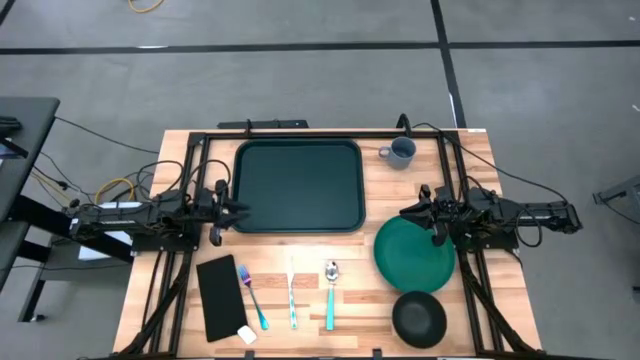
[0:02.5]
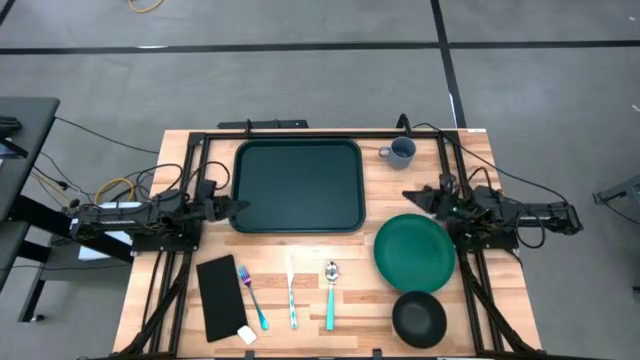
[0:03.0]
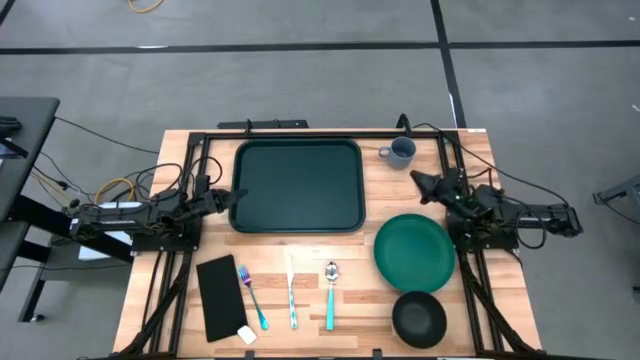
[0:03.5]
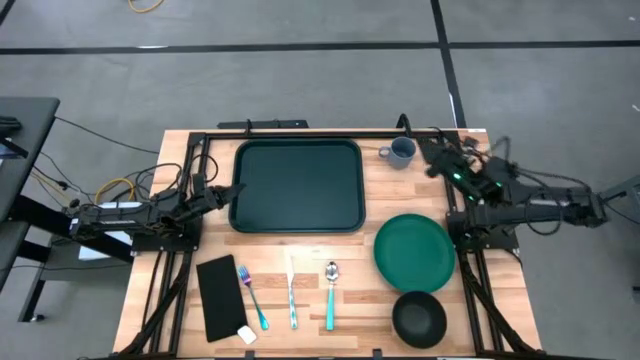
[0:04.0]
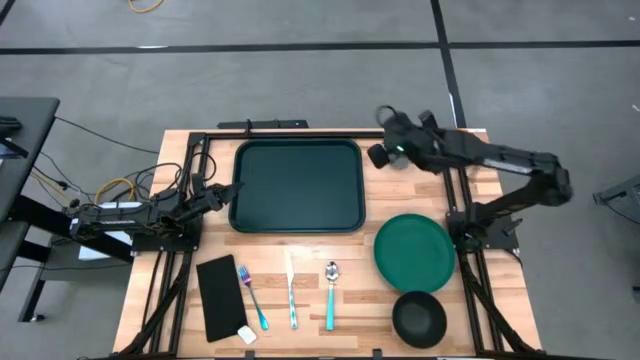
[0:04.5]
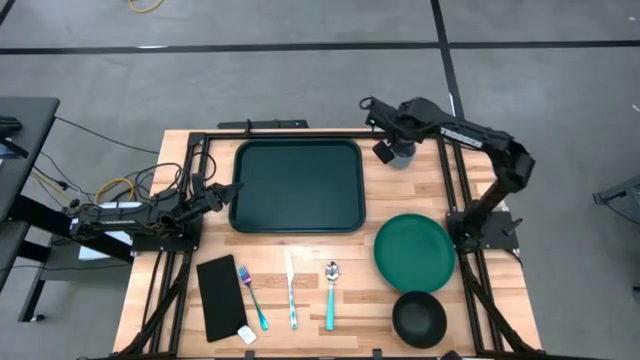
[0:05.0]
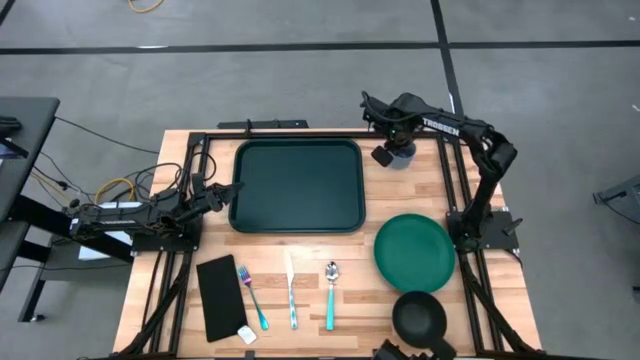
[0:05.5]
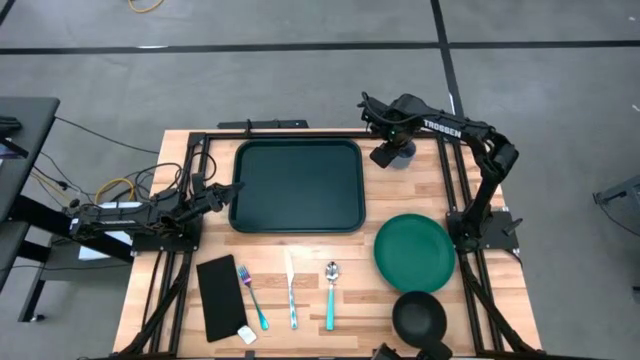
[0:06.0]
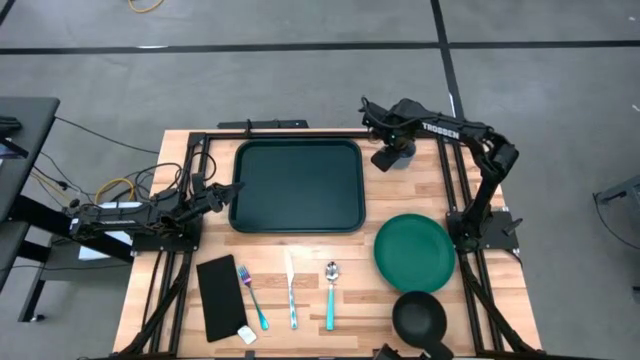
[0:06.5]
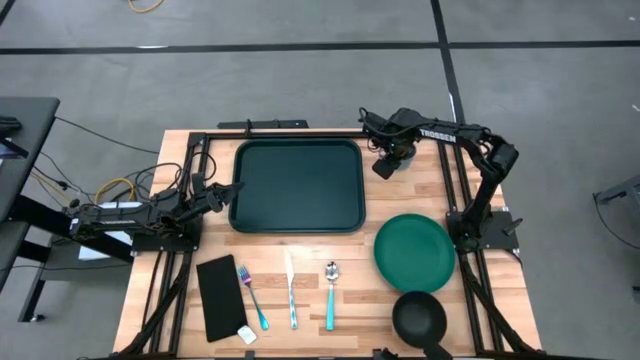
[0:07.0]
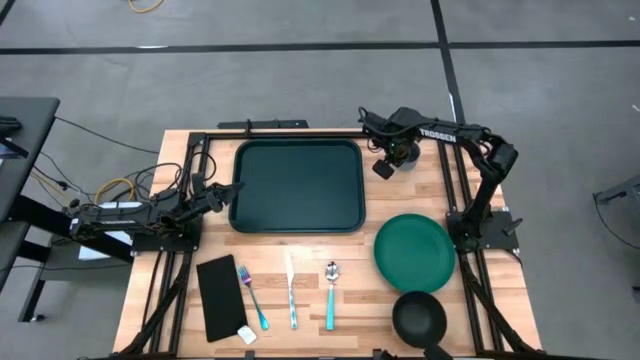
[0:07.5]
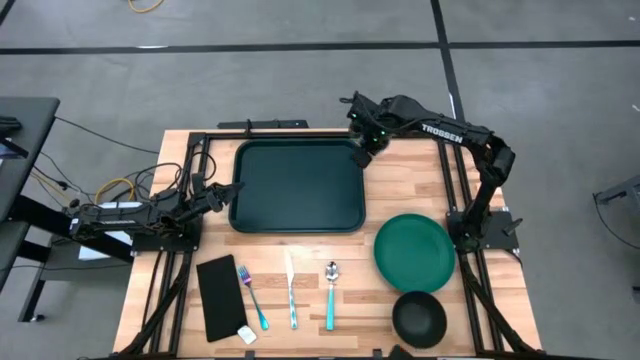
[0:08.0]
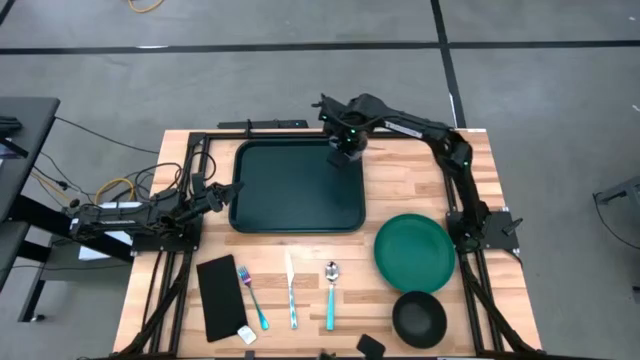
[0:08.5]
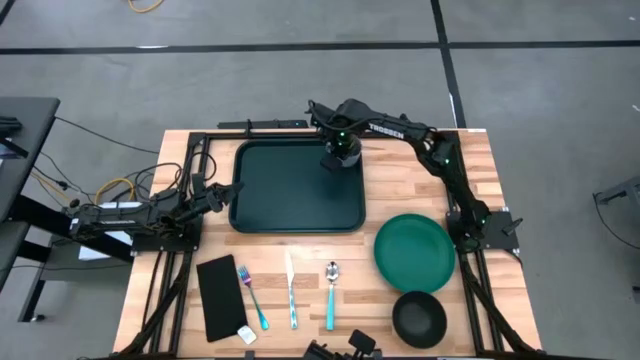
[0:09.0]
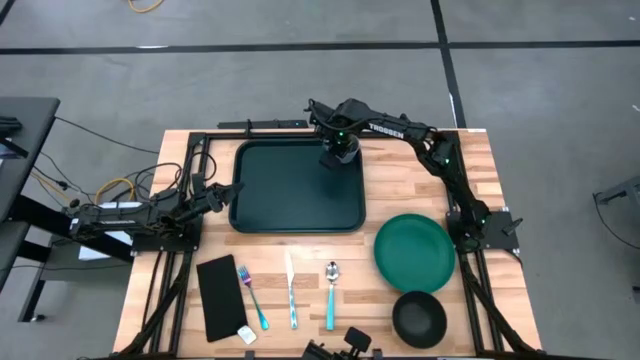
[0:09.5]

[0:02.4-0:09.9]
Task: Set up tray
Put the gray mug on the top right of the black serving tray

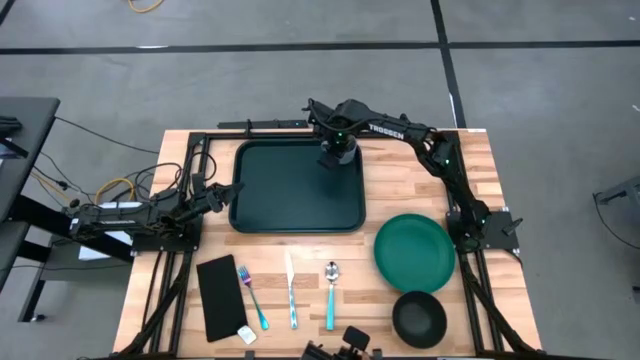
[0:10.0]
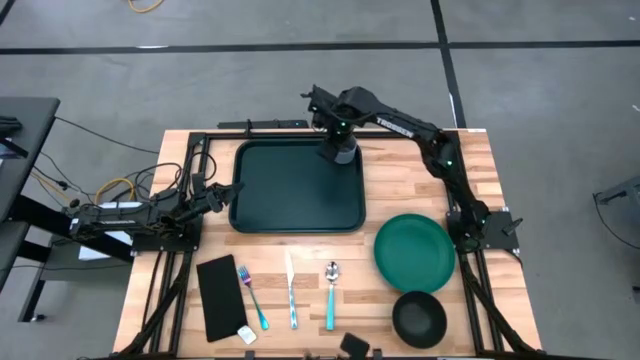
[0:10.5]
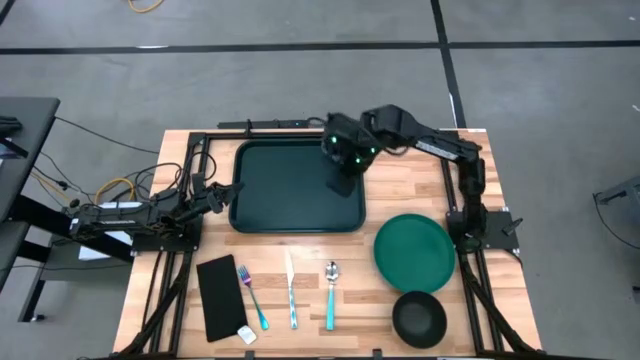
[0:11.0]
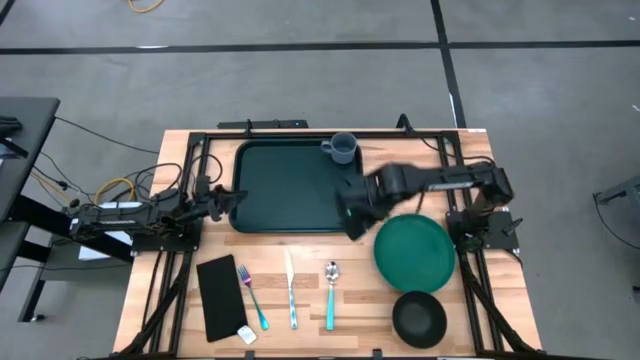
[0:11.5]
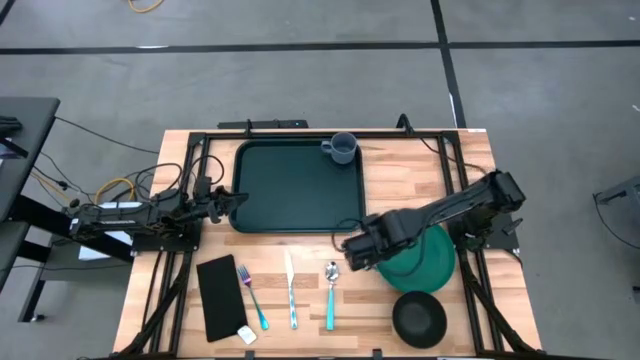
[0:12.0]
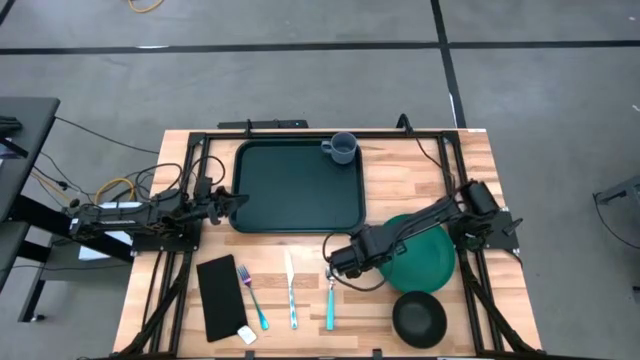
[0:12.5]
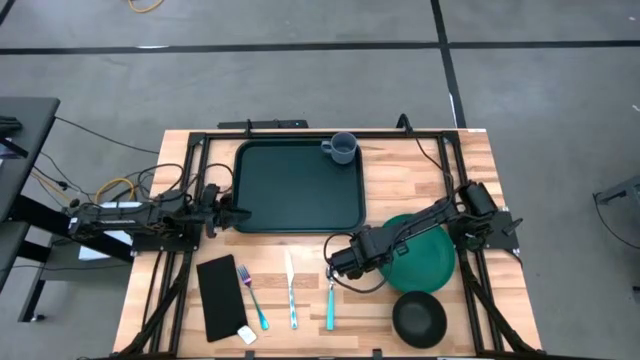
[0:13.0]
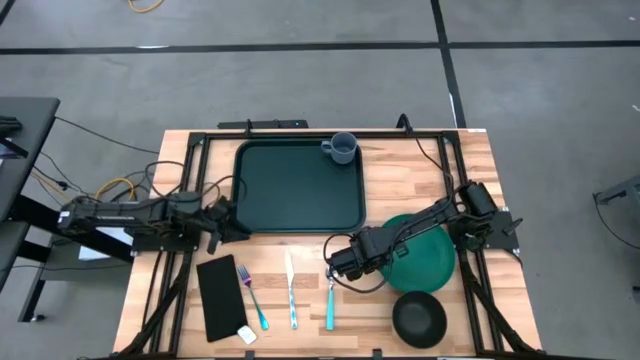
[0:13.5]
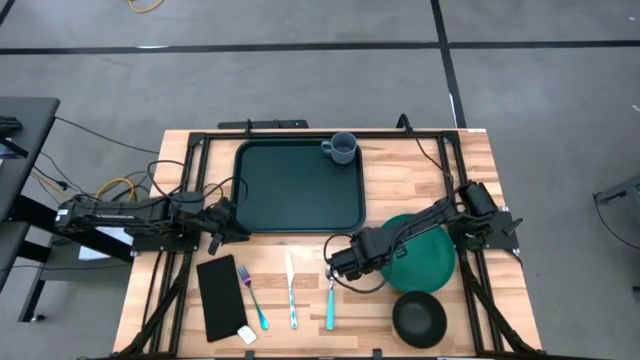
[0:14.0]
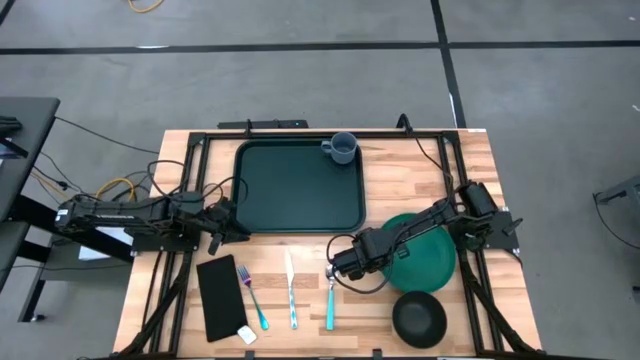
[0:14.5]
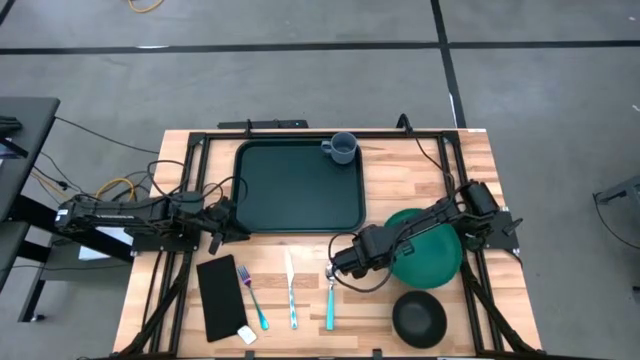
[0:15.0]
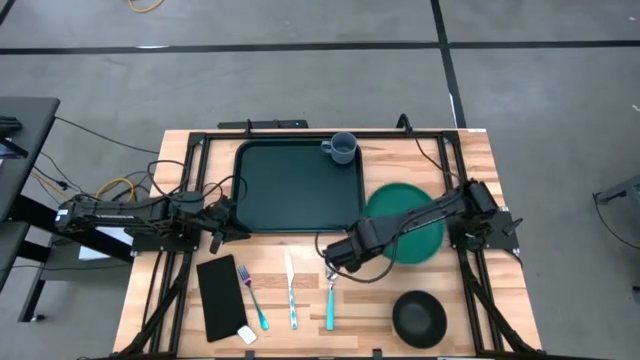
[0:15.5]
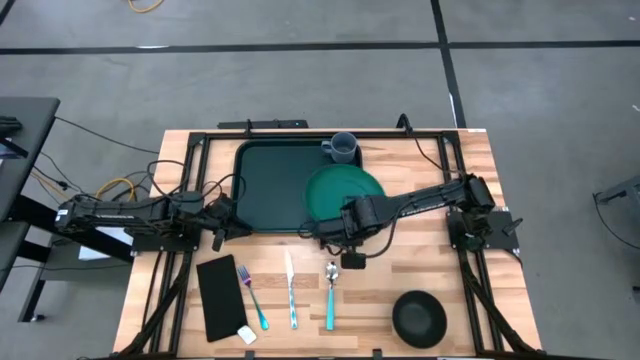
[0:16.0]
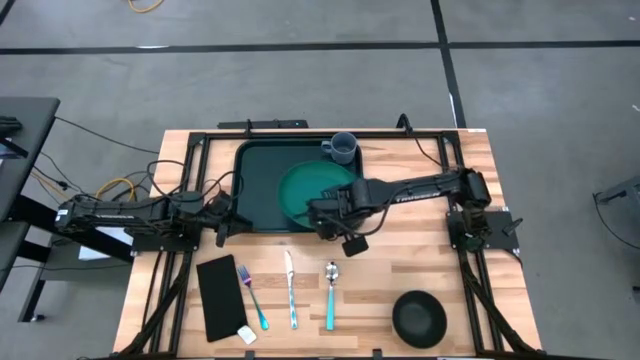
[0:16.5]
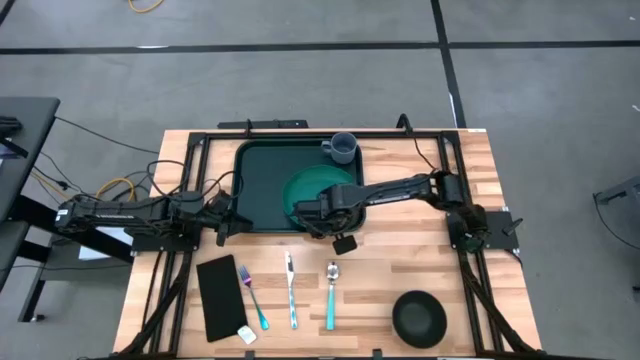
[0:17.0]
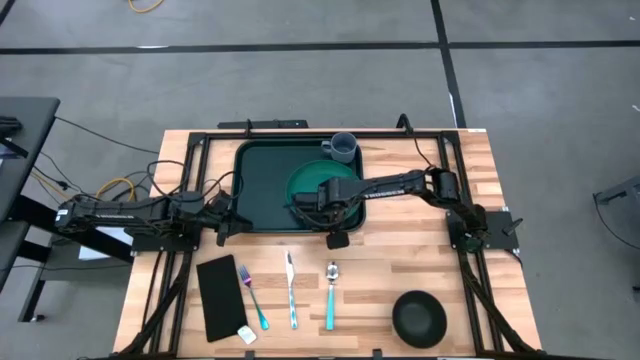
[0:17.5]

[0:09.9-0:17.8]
Put the green plate on the black serving tray to the bottom left of the gray mug

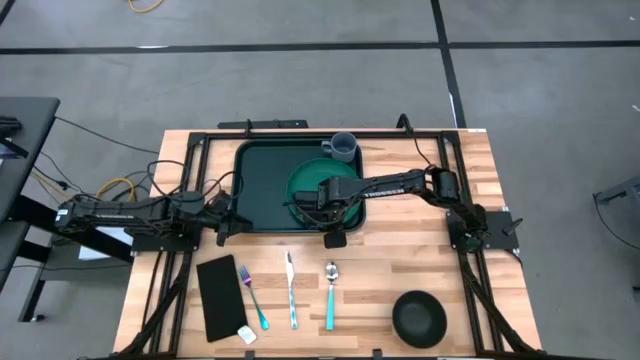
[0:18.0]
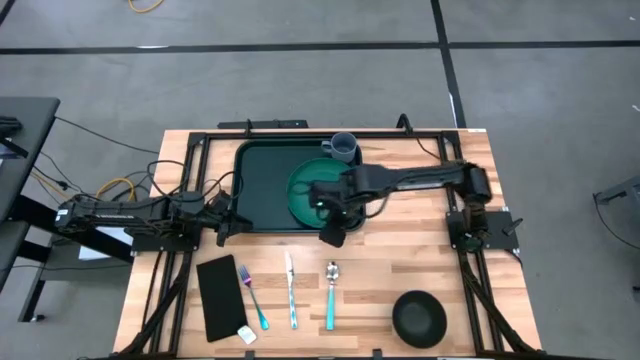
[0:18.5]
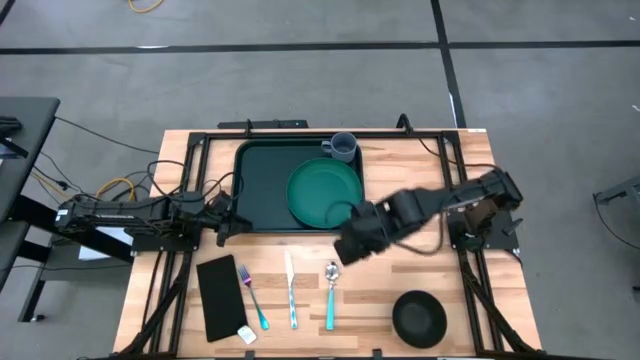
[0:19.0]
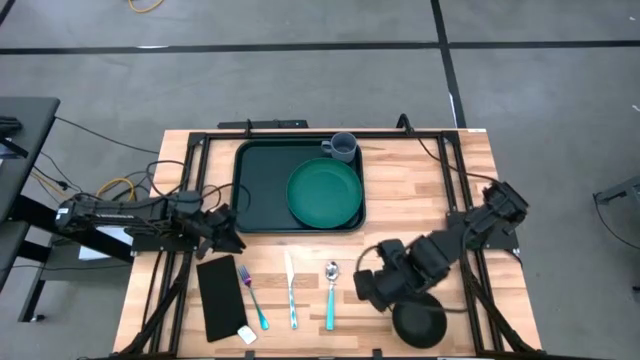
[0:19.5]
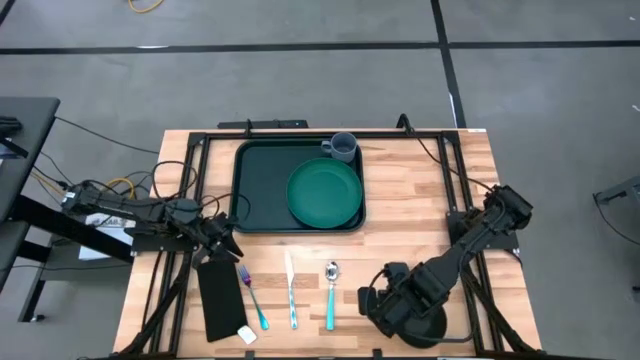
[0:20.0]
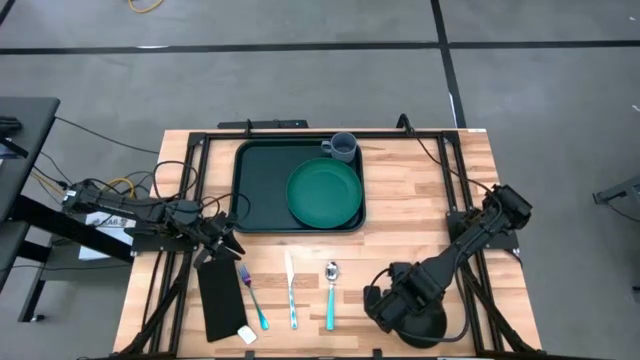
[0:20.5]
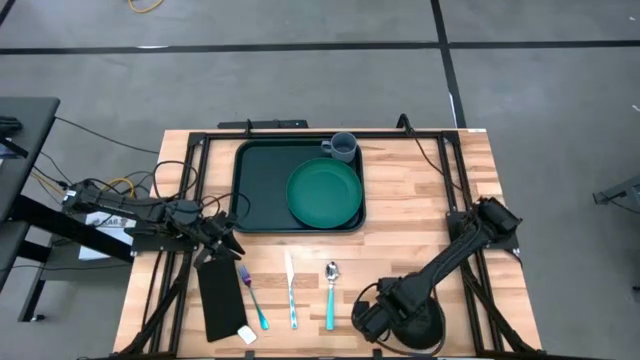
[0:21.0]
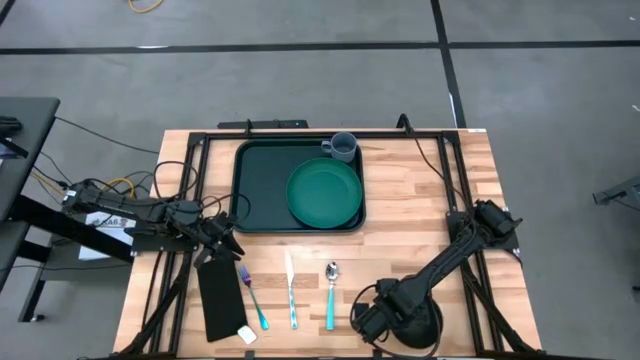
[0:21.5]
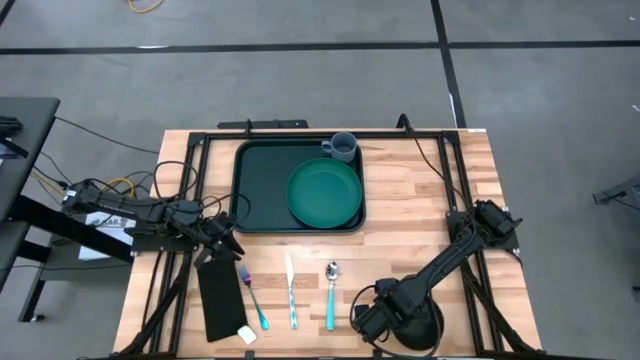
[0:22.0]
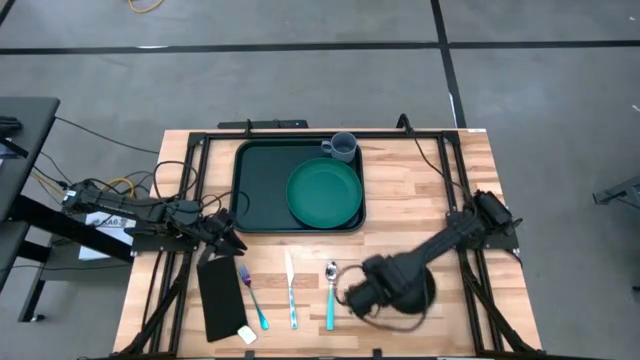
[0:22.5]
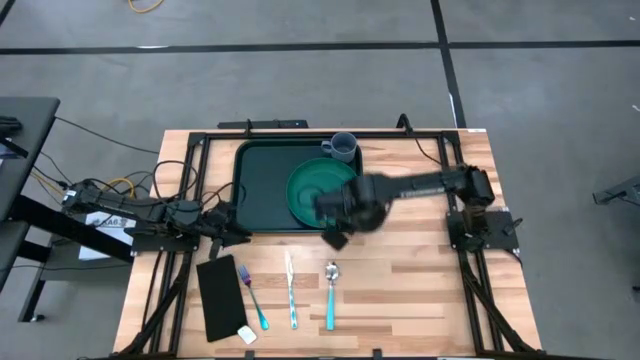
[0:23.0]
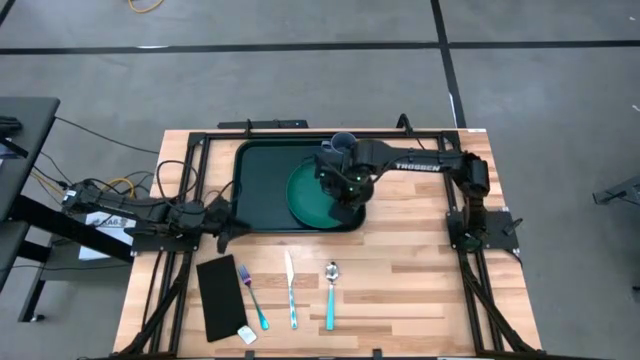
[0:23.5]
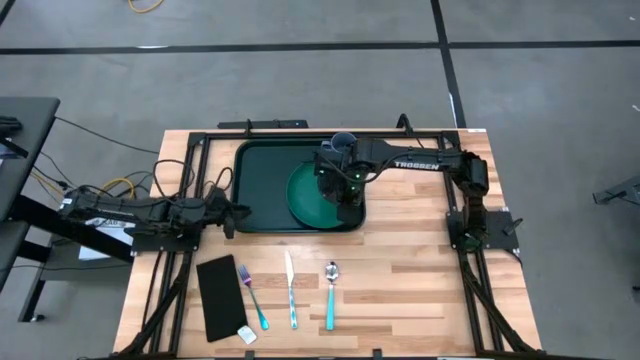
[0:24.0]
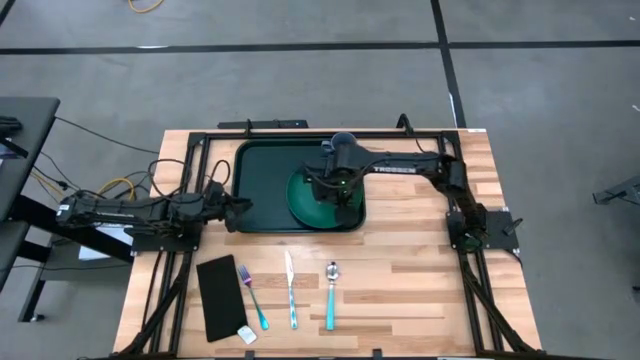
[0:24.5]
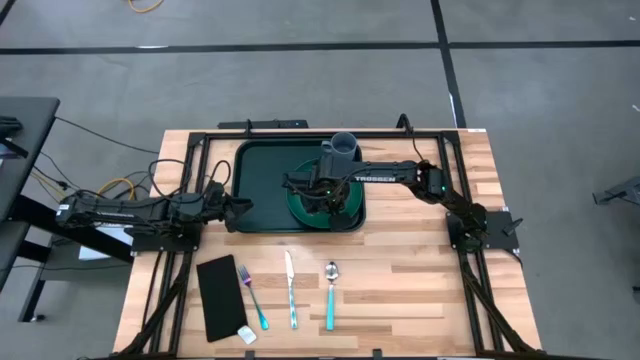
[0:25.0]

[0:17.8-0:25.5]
Put the black bowl on the green plate on the black serving tray
